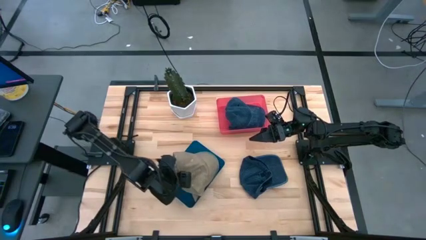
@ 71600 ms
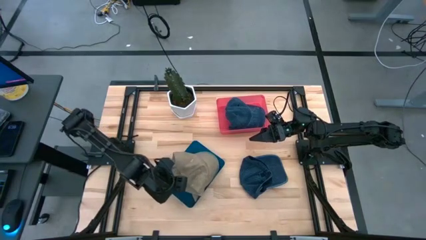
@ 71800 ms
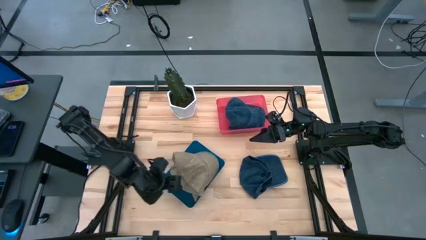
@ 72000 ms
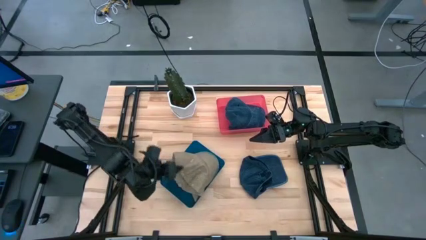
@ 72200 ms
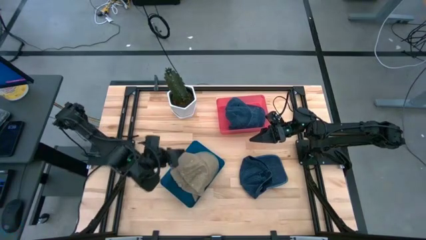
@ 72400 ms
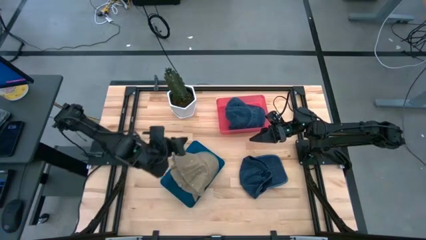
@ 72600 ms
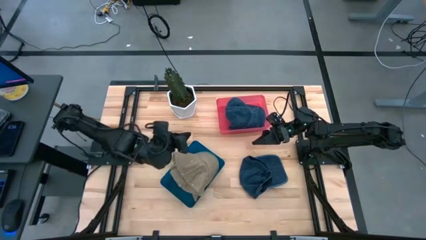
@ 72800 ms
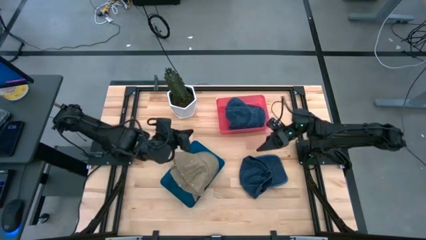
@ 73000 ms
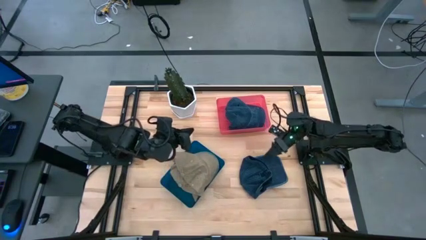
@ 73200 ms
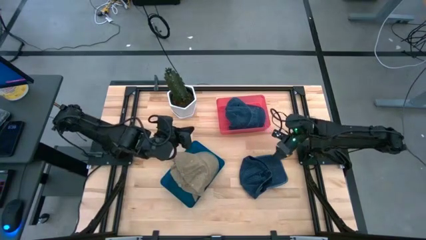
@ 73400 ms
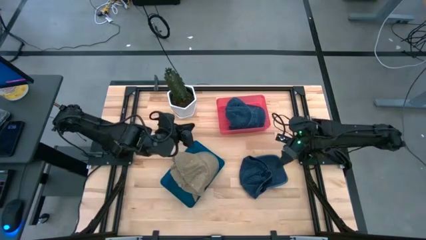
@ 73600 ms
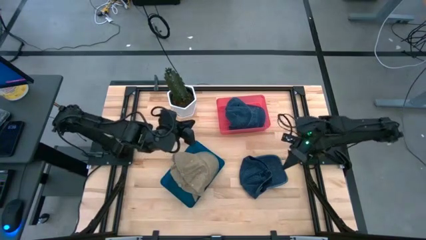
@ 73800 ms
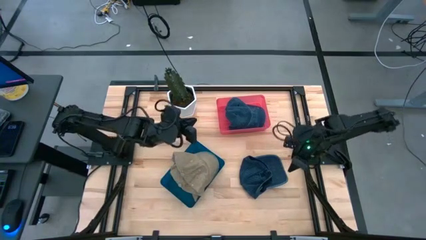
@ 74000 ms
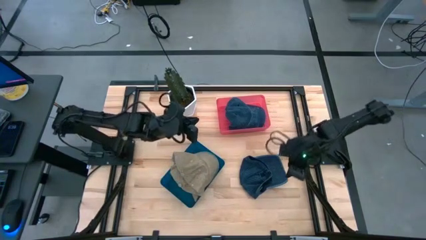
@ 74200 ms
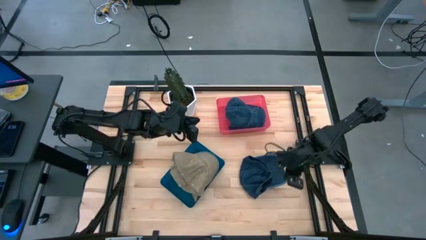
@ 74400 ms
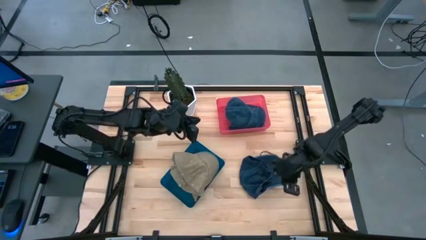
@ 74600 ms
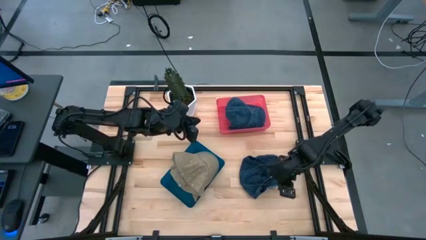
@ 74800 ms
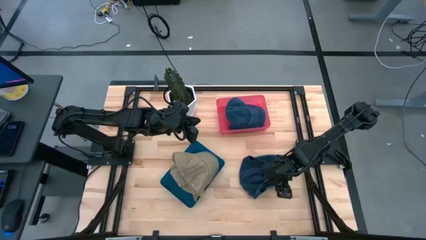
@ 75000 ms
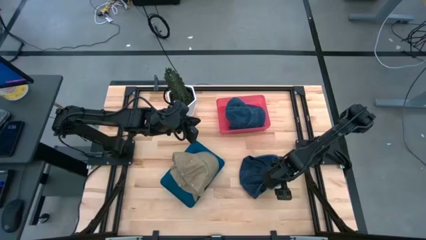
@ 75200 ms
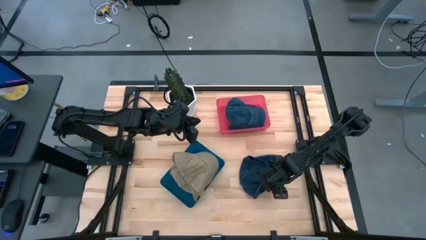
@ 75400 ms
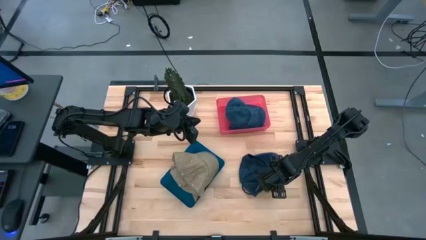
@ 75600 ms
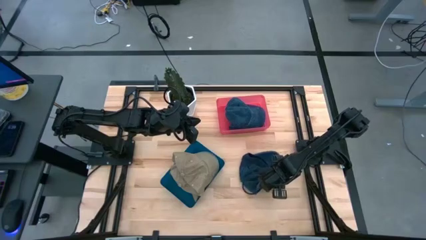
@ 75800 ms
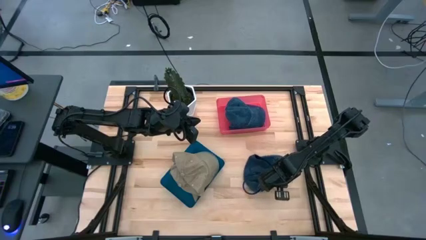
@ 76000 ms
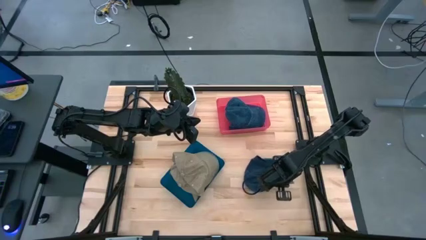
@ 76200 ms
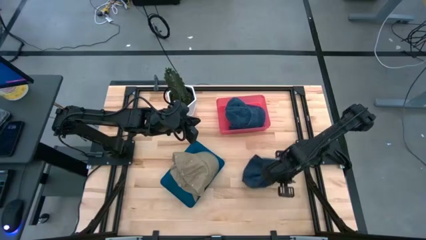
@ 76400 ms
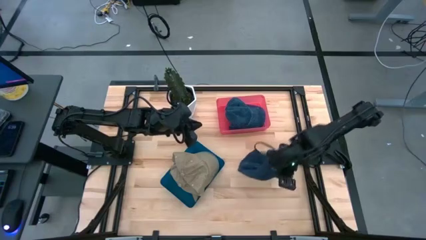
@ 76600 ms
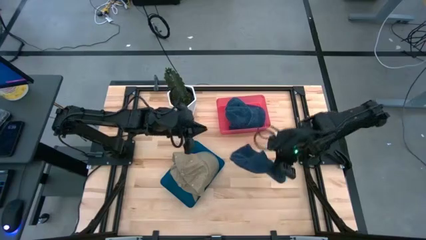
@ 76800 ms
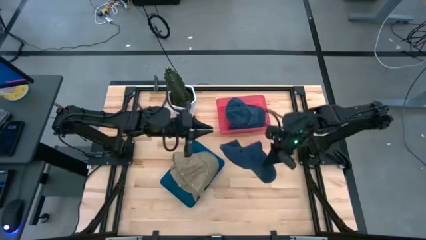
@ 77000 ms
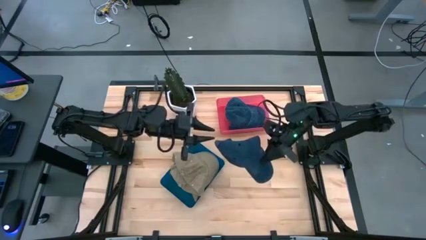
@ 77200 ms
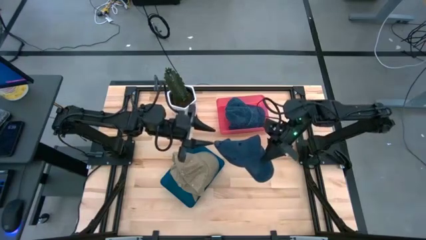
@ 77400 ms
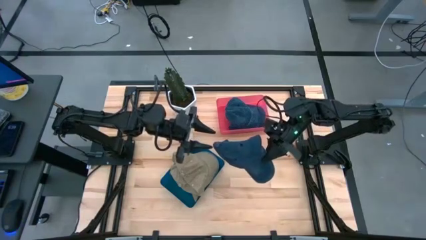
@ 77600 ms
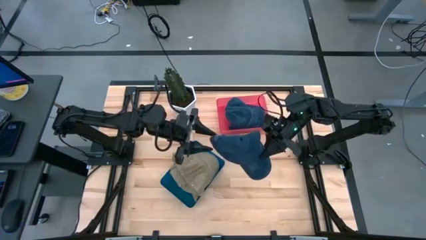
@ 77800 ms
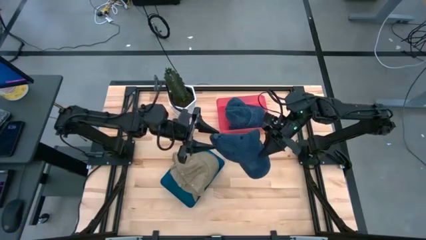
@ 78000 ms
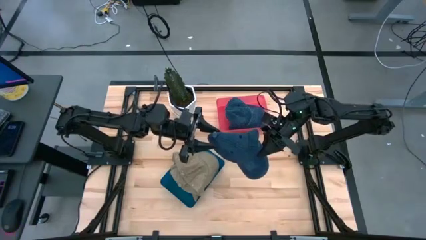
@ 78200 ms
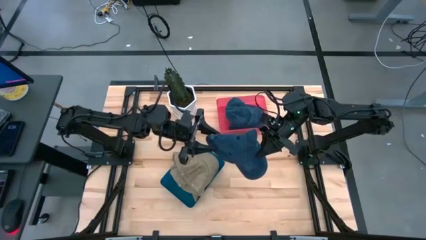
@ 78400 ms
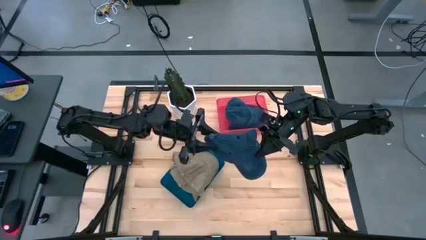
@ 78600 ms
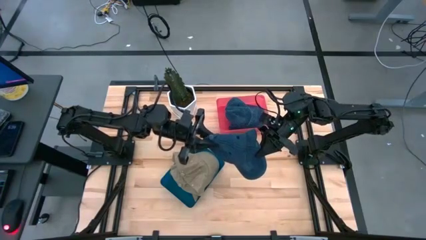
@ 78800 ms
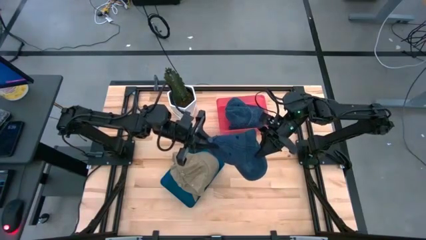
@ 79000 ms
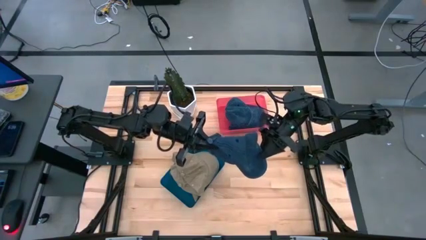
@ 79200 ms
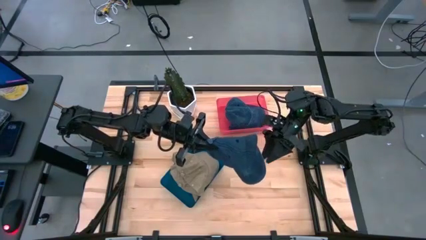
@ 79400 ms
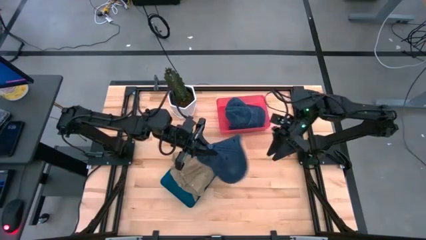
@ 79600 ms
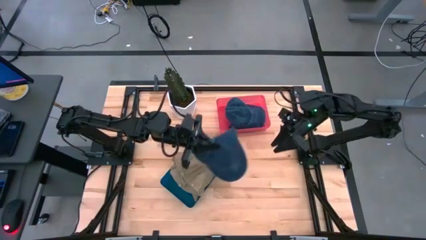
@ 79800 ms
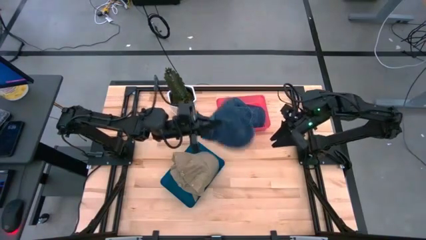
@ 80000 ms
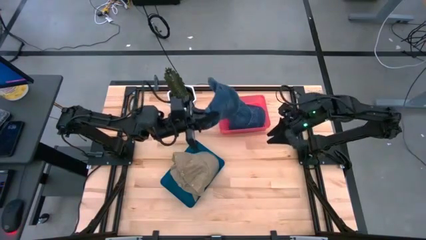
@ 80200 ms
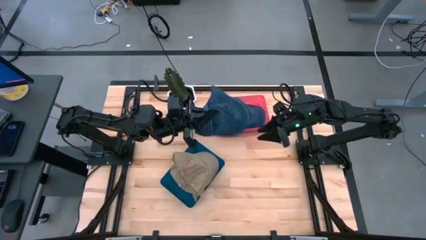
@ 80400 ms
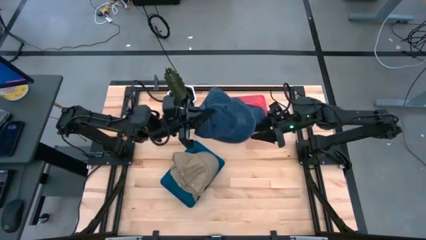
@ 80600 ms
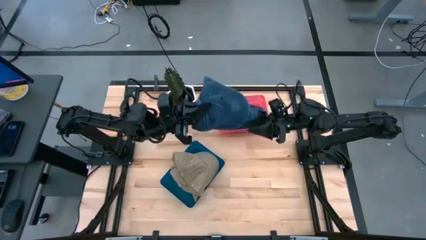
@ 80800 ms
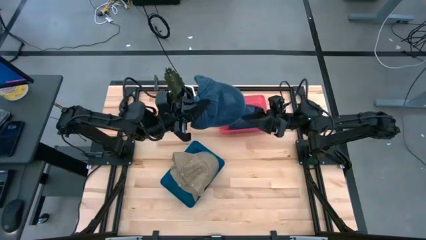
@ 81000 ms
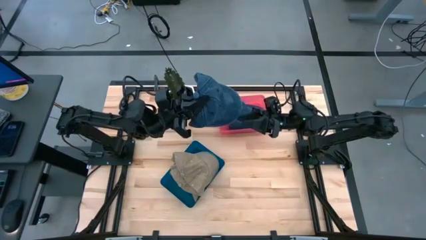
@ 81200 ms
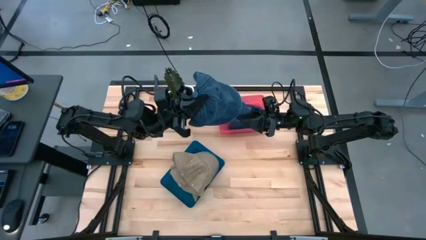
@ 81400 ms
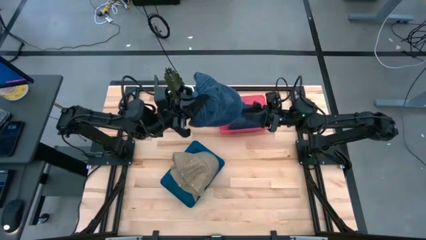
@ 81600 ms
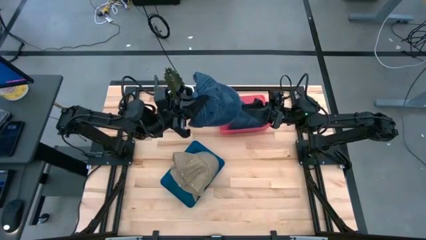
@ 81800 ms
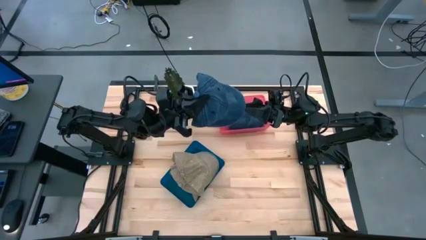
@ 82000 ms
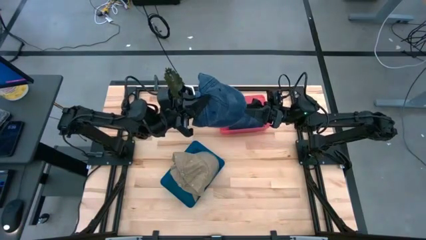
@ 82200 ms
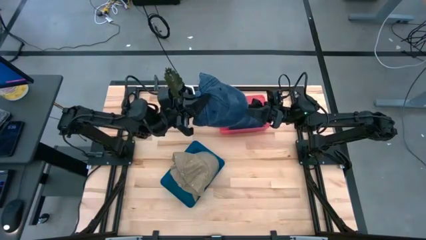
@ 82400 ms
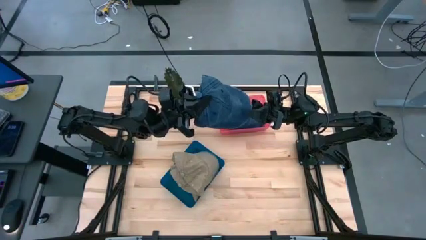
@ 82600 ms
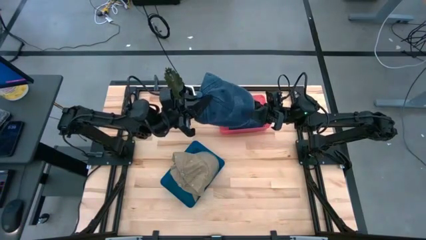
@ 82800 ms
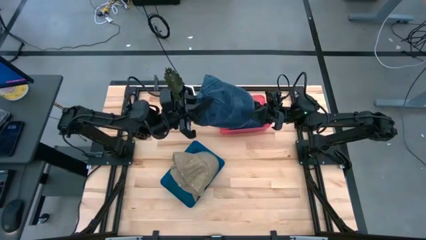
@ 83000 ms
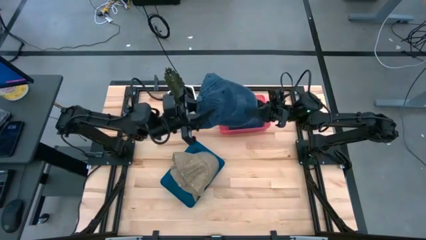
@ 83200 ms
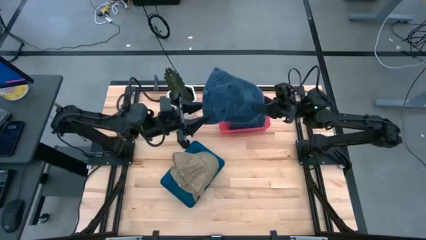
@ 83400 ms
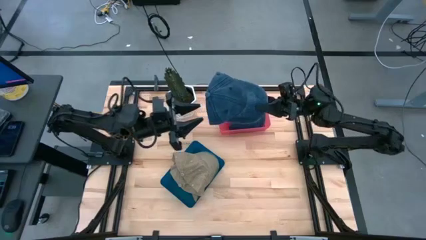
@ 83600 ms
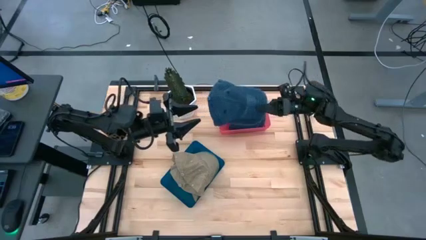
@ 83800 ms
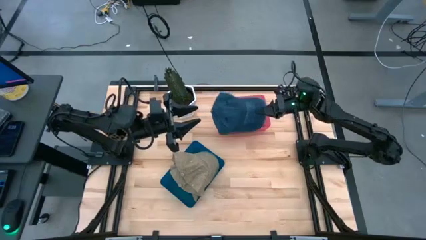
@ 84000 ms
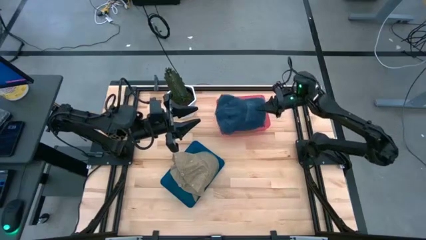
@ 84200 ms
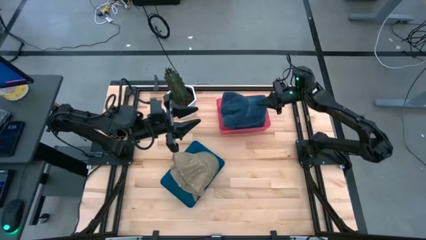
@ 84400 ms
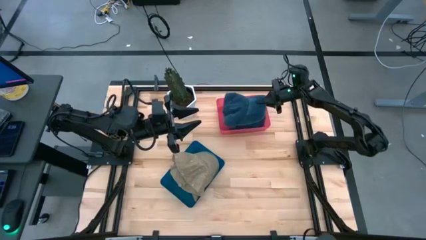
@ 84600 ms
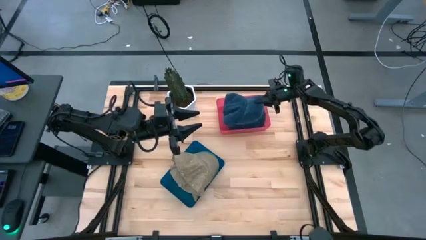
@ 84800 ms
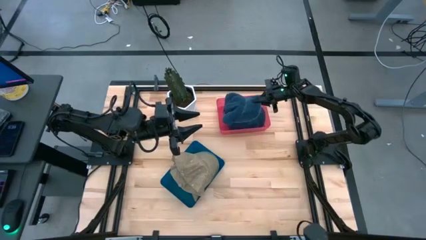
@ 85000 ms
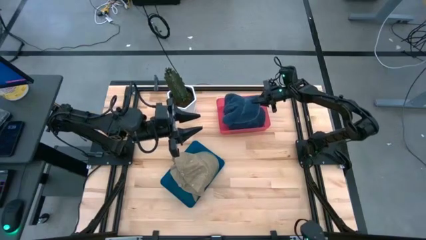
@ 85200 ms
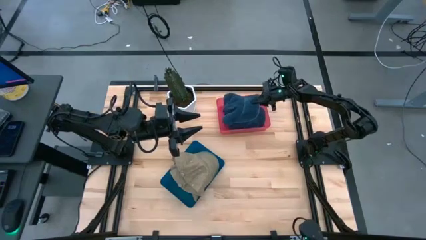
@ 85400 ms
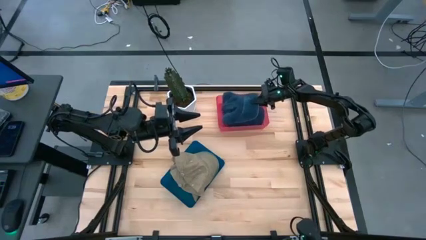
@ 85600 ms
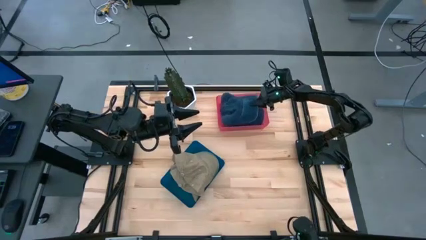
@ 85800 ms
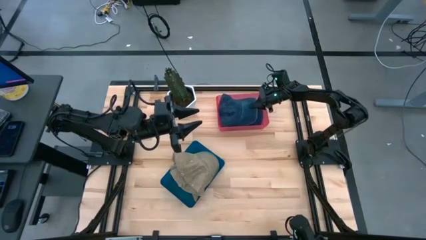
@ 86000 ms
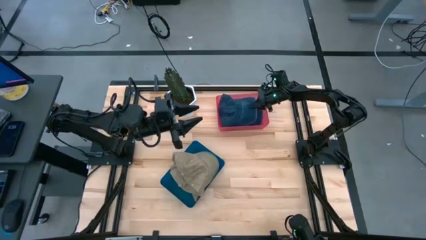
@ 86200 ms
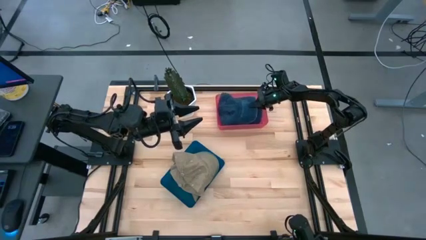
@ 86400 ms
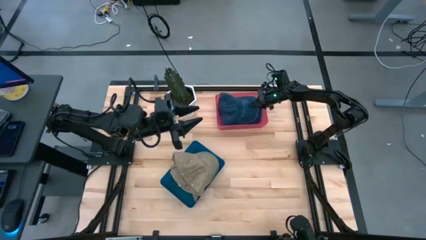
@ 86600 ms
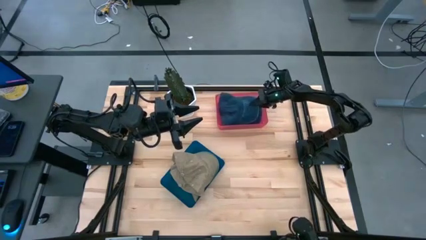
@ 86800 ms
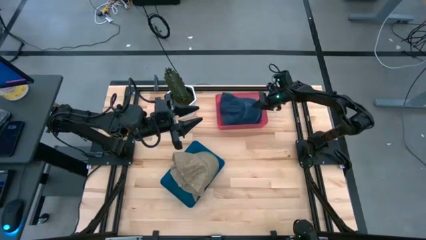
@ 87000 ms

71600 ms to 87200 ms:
Task: Pick & Place hat
Put the blue cap into the red bin

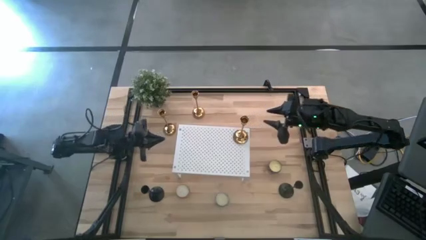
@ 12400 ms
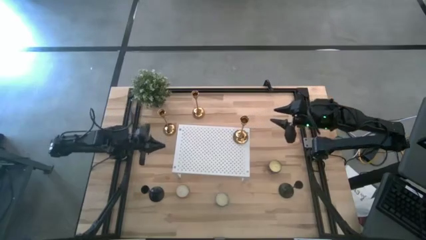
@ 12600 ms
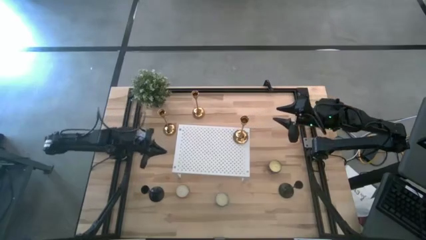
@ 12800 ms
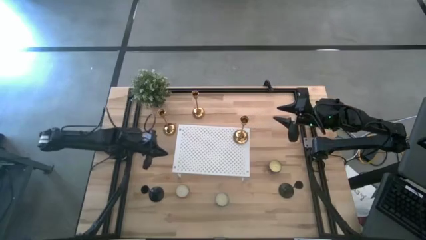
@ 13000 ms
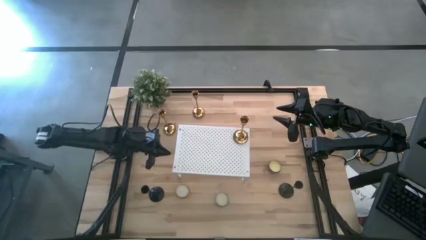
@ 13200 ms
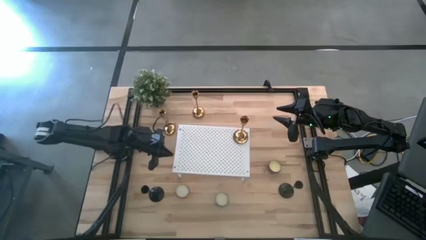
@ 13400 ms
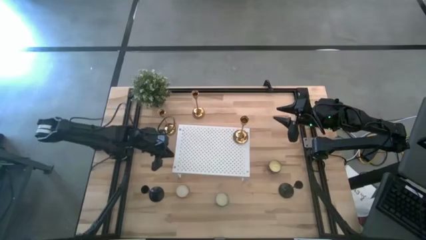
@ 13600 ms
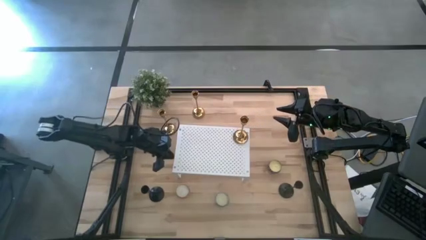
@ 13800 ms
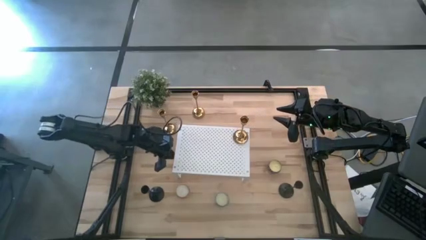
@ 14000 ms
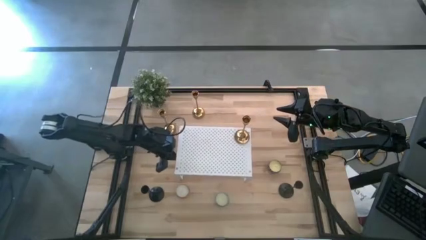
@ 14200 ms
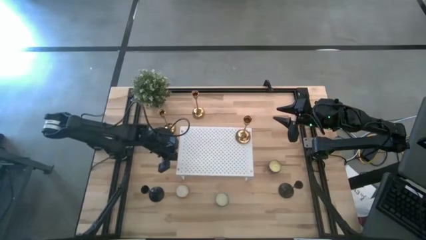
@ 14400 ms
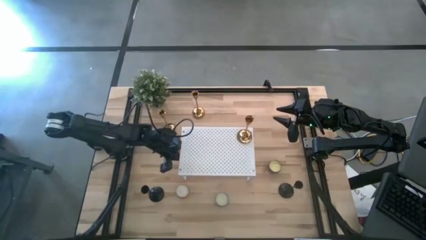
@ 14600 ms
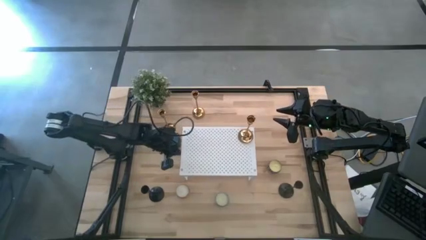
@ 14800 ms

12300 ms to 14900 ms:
Task: Pick & Place candle stick holders
Adjust the shelf
